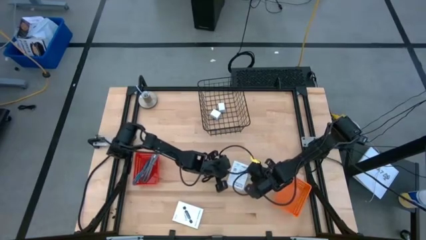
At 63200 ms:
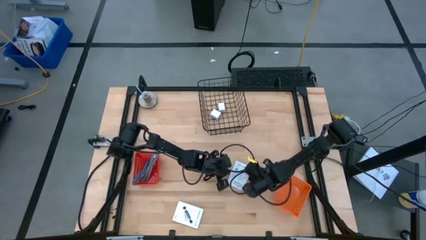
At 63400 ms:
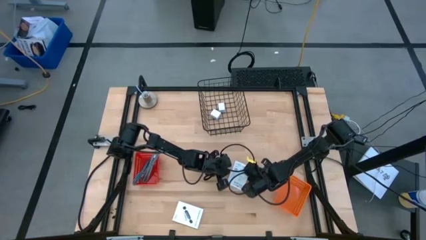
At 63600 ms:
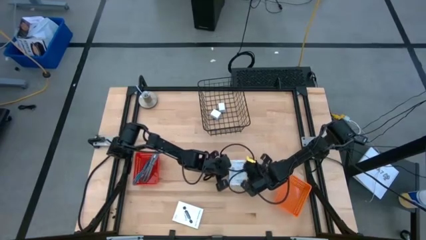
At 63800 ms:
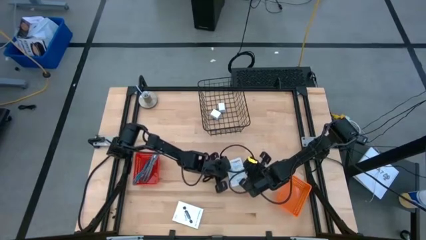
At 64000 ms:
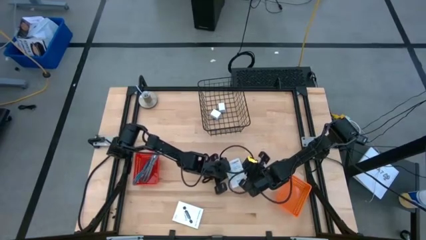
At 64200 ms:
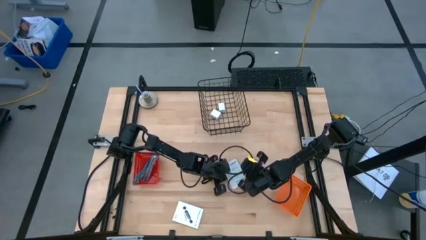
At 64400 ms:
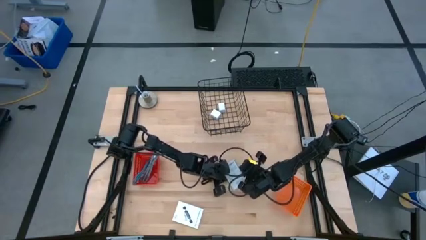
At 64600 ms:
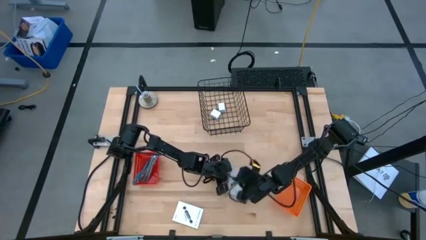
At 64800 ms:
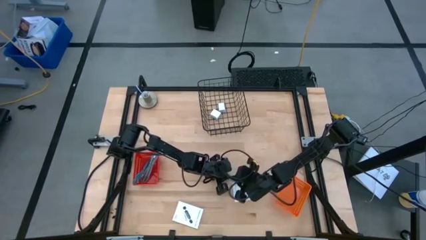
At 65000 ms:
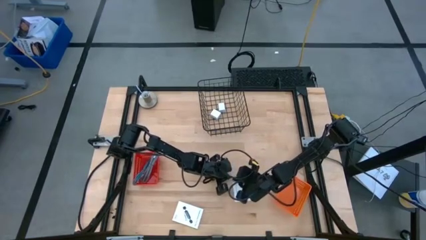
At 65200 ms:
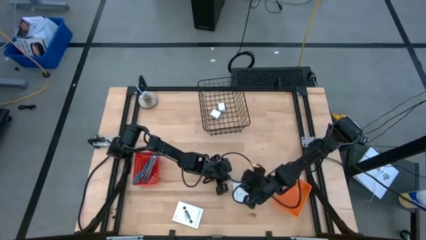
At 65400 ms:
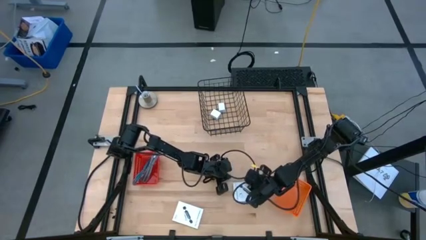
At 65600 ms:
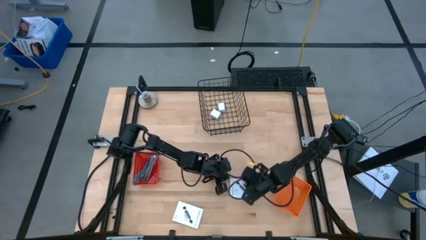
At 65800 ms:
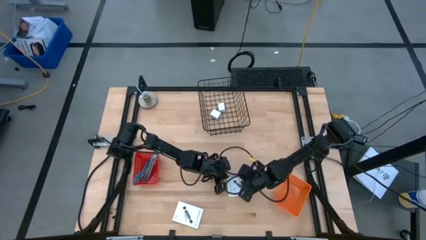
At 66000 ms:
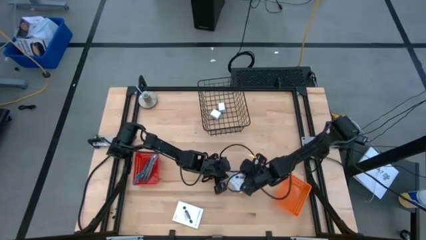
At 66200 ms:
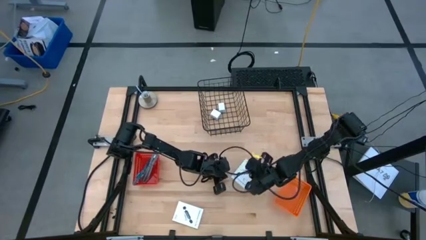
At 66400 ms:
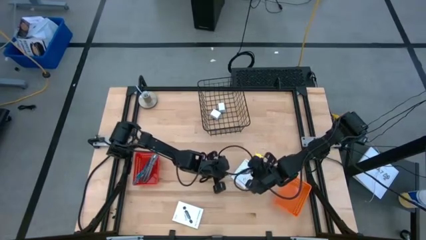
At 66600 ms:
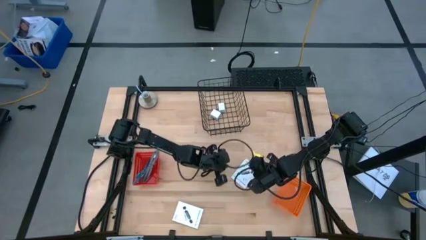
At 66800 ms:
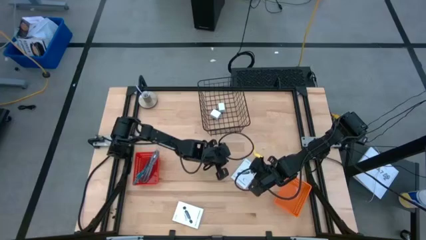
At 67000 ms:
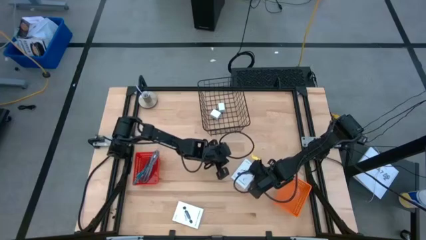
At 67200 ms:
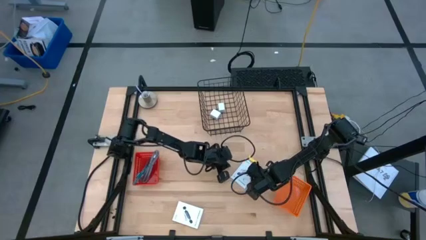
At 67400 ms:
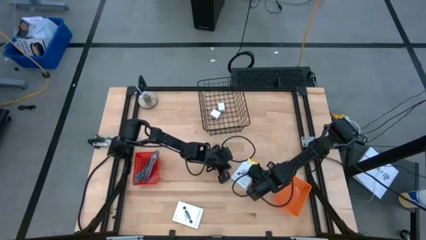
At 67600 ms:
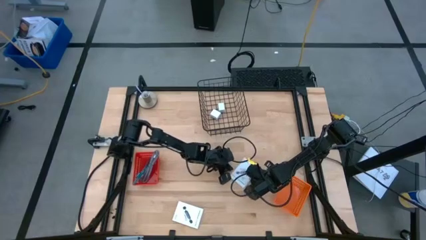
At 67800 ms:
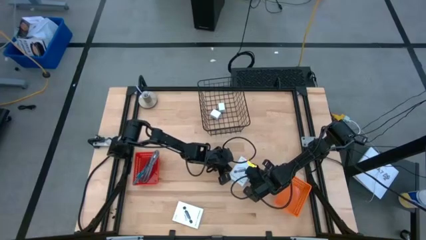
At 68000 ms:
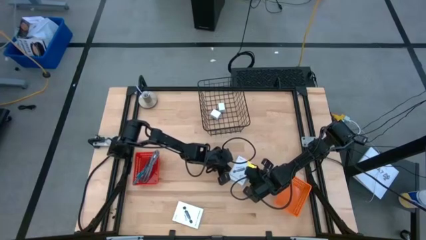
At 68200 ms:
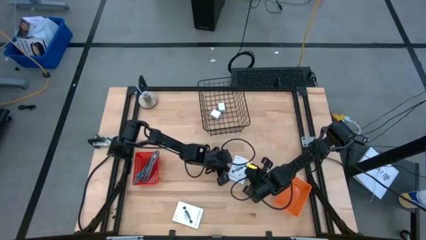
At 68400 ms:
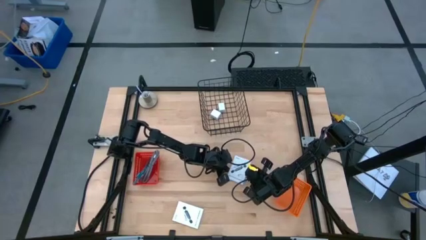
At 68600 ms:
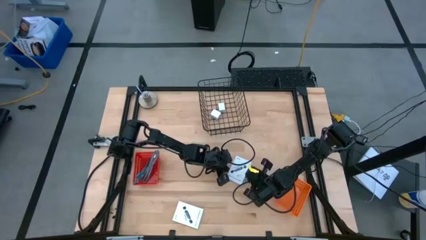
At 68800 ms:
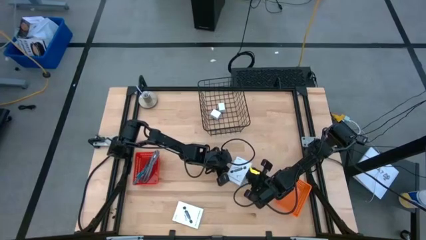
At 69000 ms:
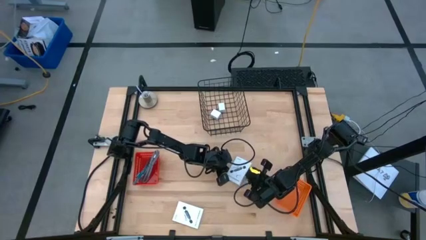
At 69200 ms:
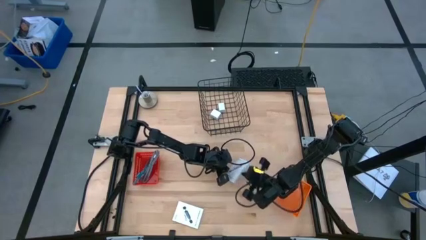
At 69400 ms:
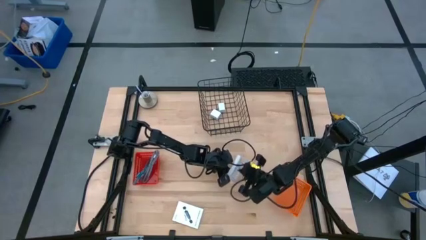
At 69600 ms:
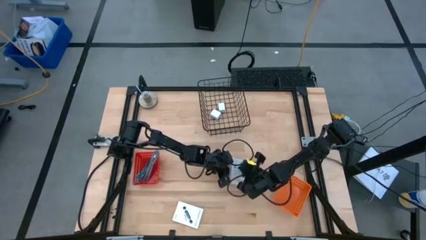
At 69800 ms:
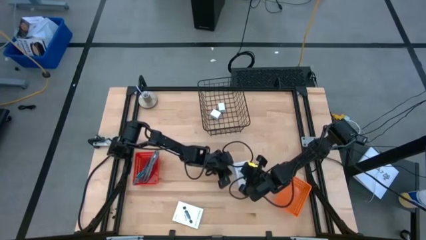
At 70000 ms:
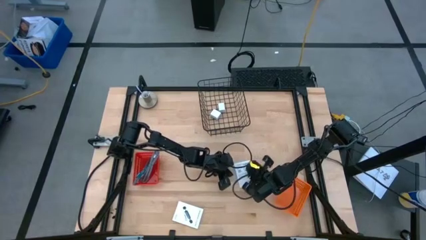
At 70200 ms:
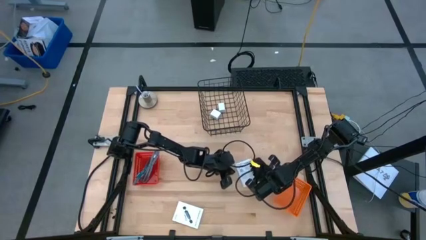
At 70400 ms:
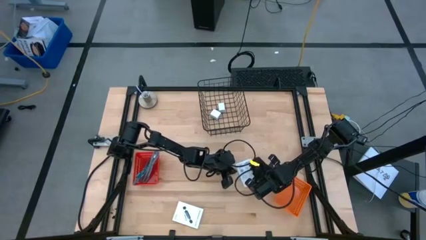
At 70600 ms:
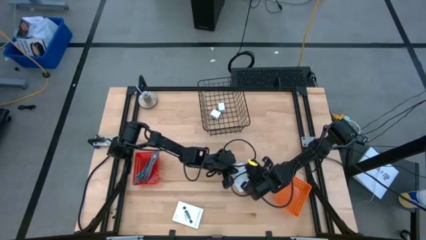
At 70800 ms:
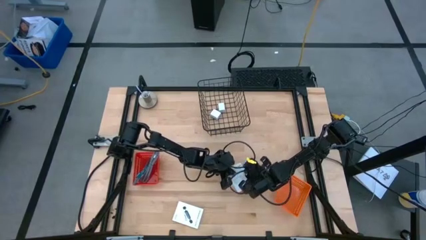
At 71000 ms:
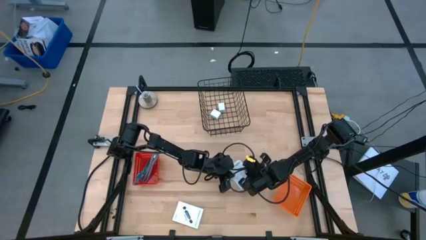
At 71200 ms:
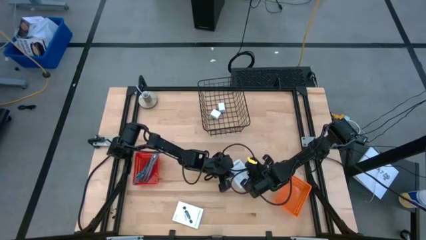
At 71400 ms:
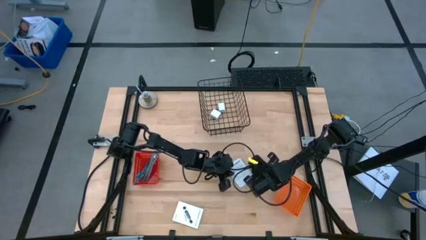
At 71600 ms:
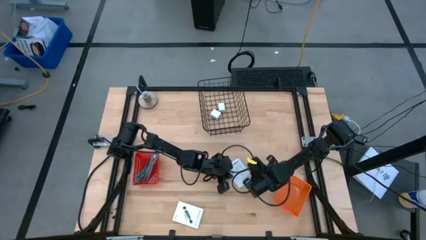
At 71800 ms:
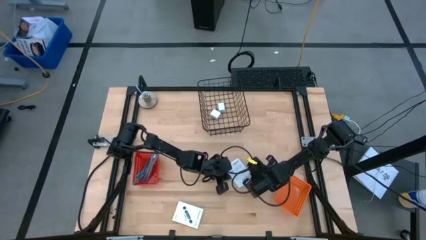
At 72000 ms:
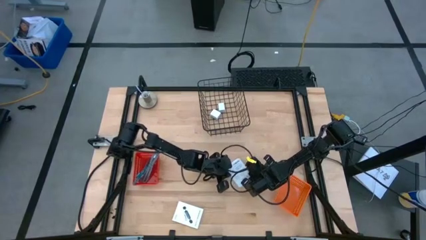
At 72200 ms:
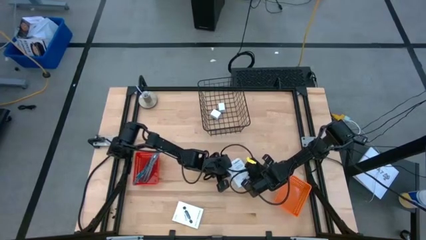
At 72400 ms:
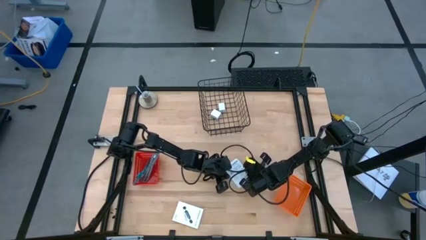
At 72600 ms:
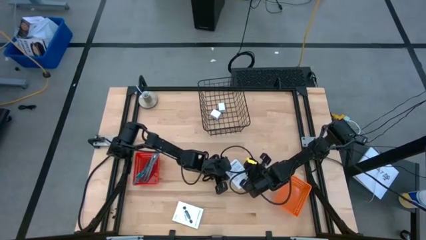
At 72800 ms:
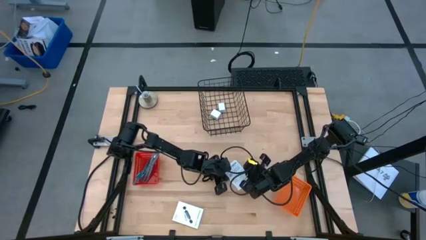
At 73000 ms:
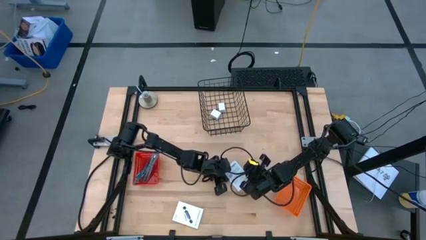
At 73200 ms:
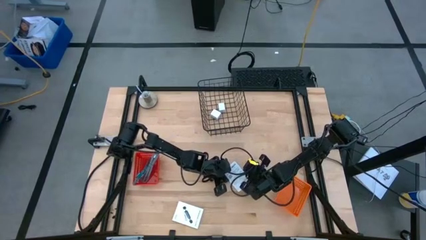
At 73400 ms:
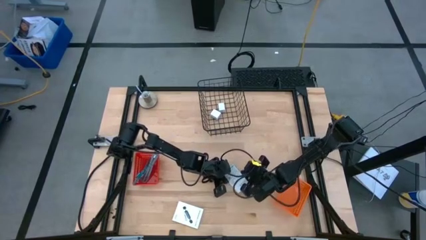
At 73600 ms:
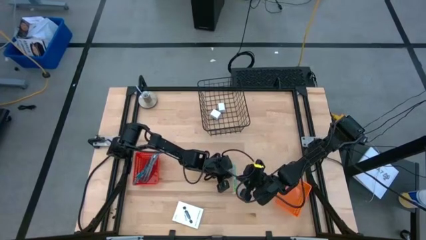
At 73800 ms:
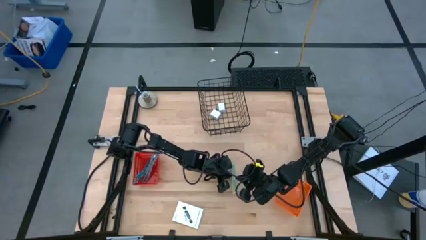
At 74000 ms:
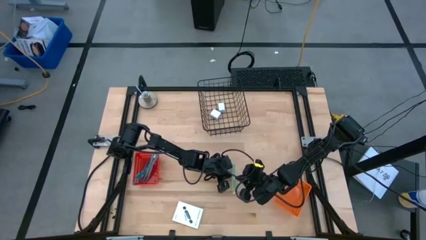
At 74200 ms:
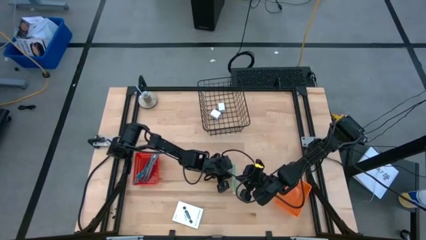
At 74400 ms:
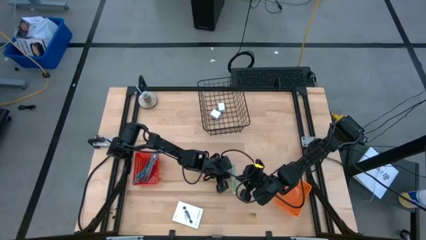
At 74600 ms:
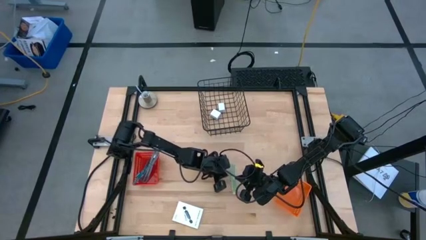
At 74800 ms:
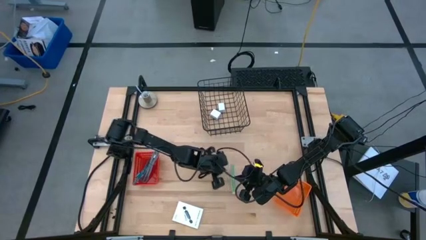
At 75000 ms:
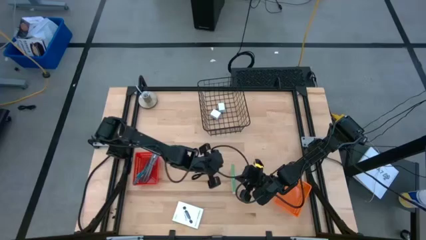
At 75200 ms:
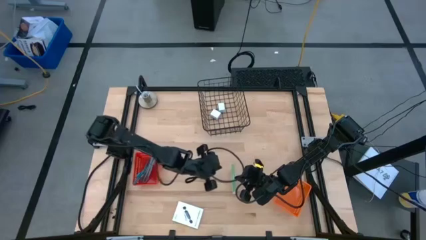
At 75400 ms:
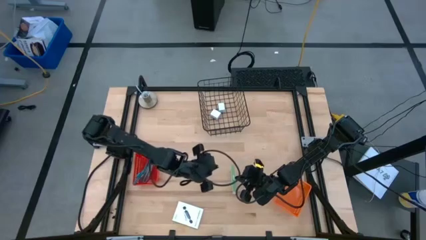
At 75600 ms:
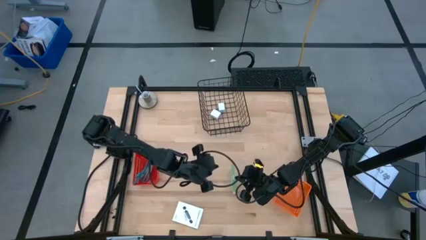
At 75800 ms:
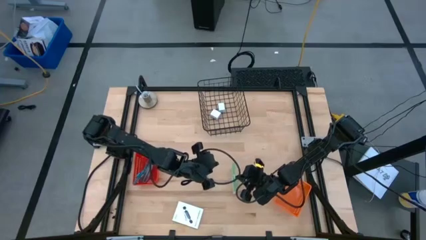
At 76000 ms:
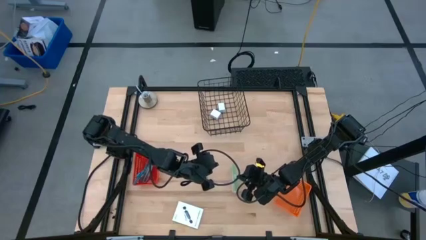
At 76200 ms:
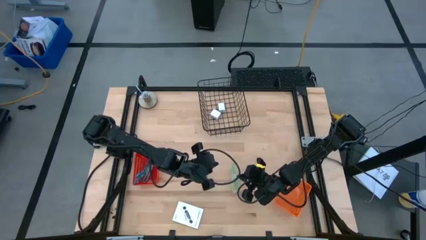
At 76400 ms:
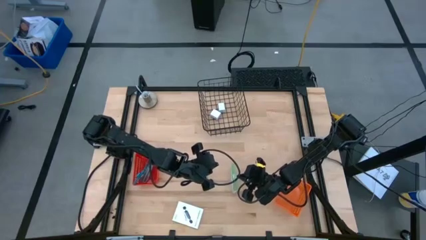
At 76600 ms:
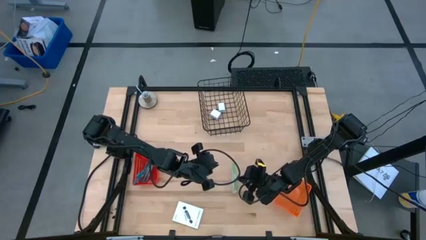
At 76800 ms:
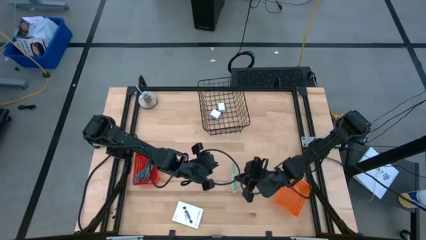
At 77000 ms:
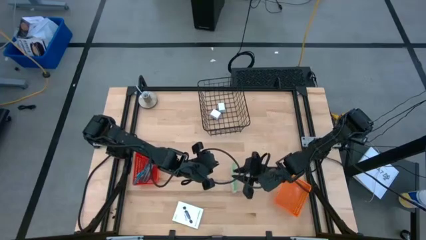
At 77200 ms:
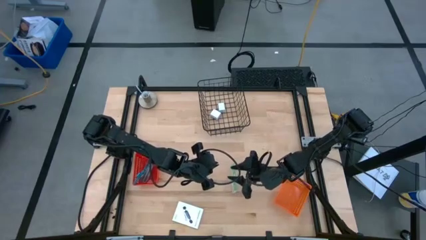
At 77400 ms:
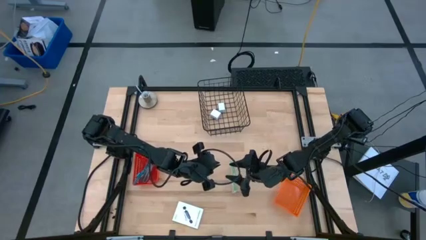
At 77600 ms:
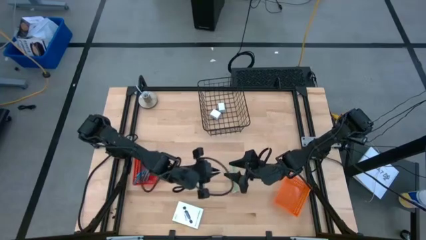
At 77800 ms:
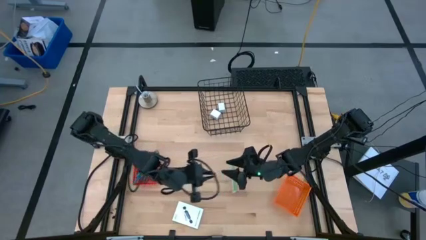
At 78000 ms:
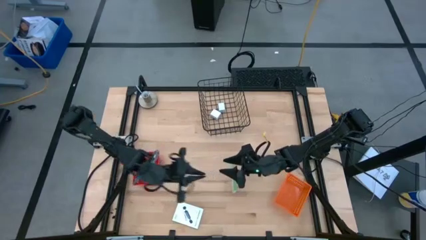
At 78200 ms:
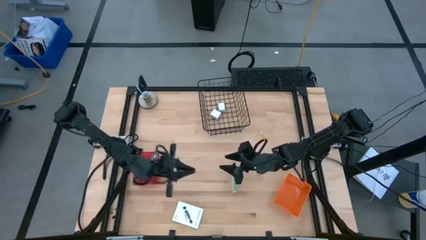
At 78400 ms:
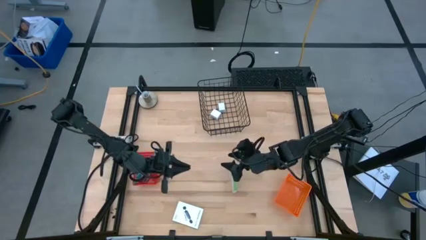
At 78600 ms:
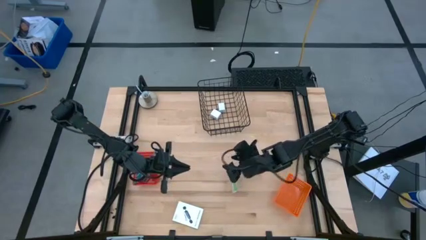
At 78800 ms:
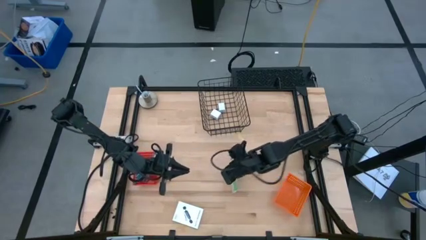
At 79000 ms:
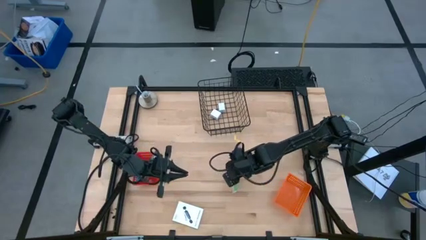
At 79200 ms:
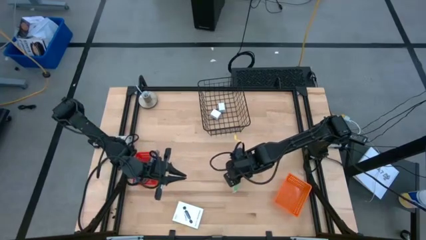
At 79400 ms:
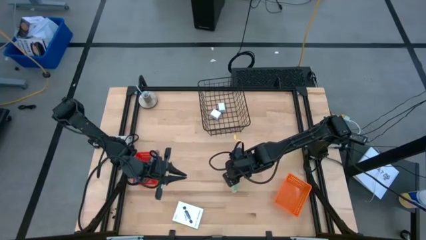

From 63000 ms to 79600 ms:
Task: Pick and place items into bin
Put the right card reader box into the orange basket
